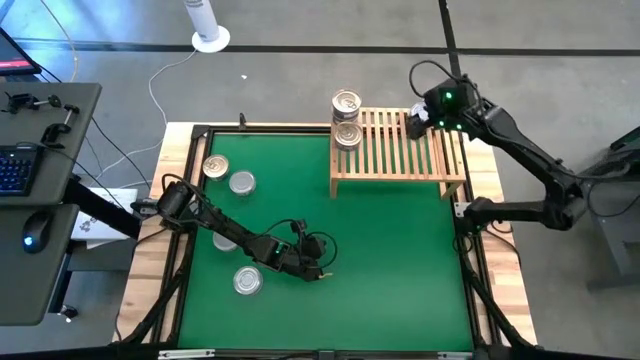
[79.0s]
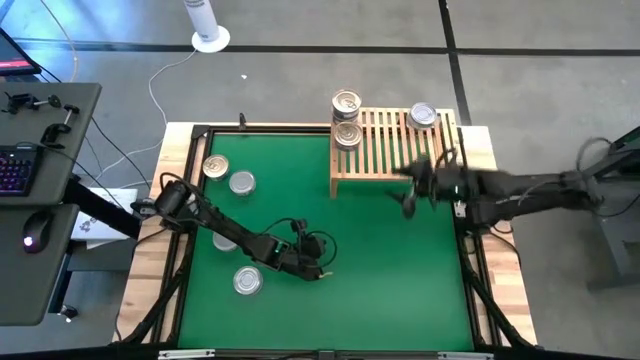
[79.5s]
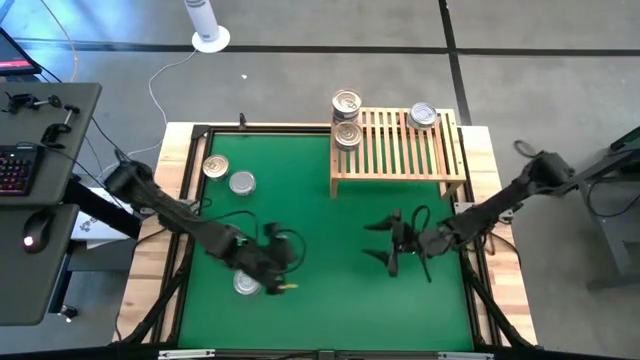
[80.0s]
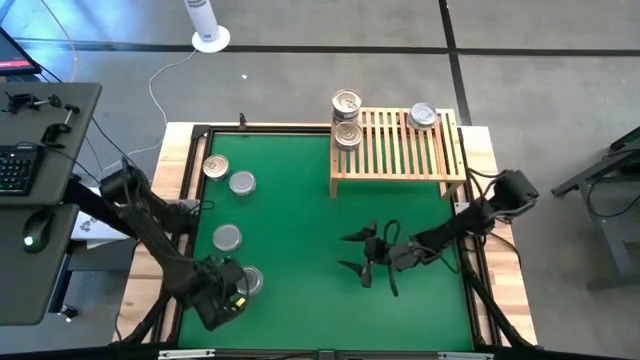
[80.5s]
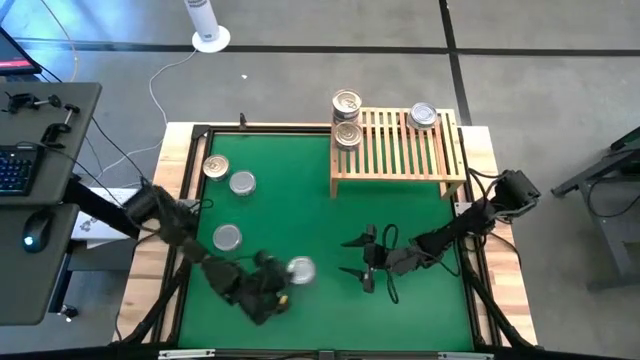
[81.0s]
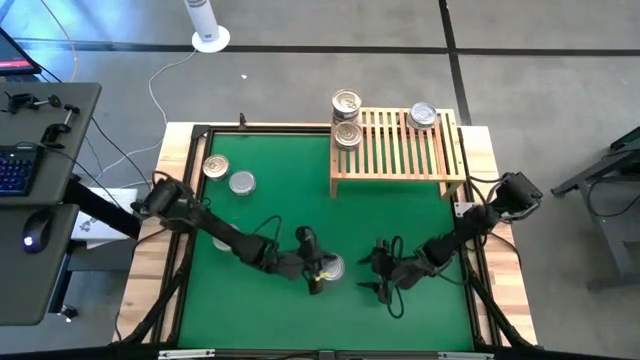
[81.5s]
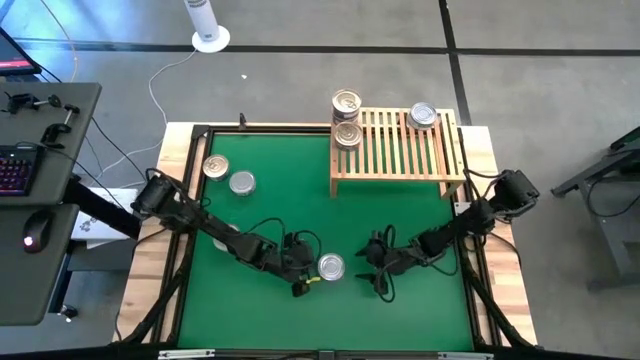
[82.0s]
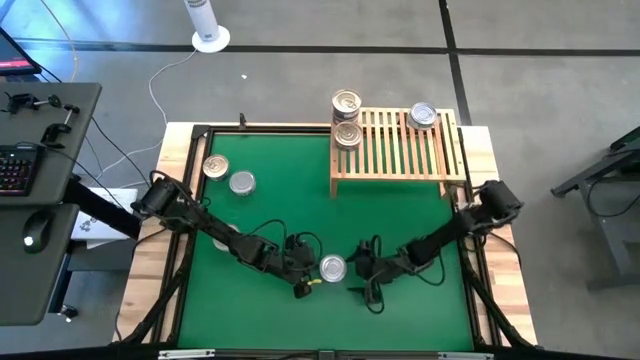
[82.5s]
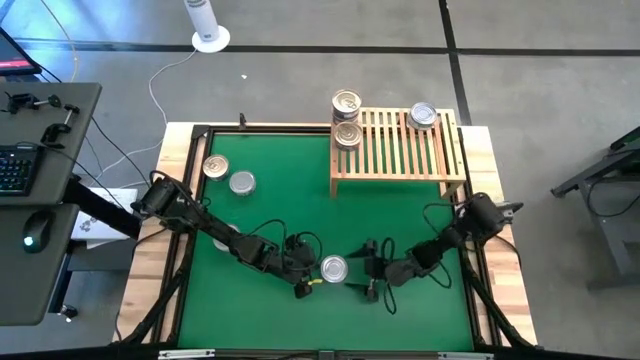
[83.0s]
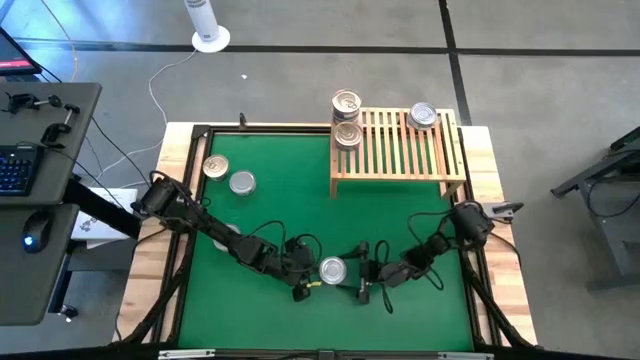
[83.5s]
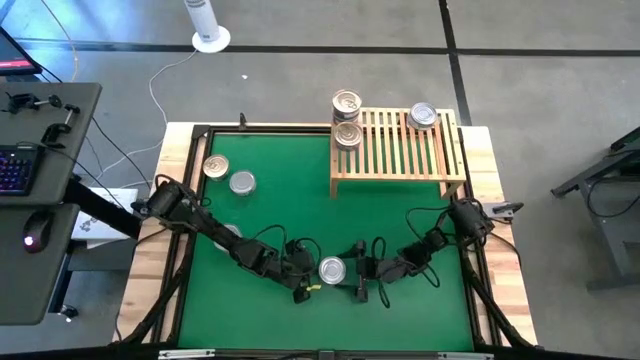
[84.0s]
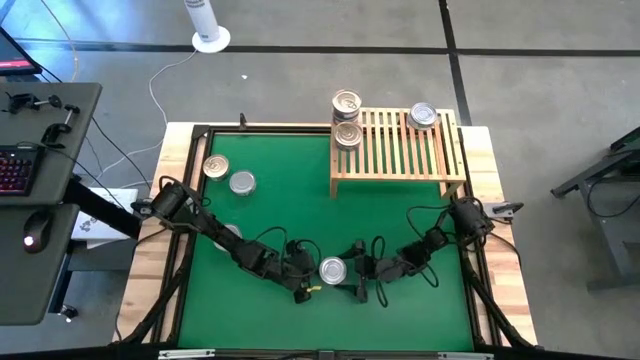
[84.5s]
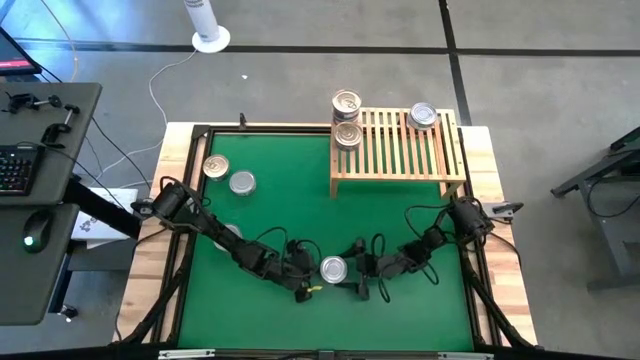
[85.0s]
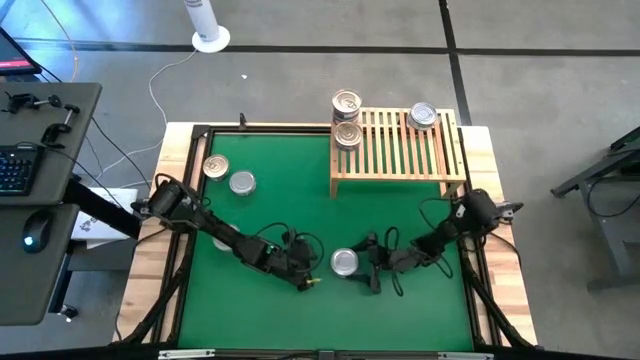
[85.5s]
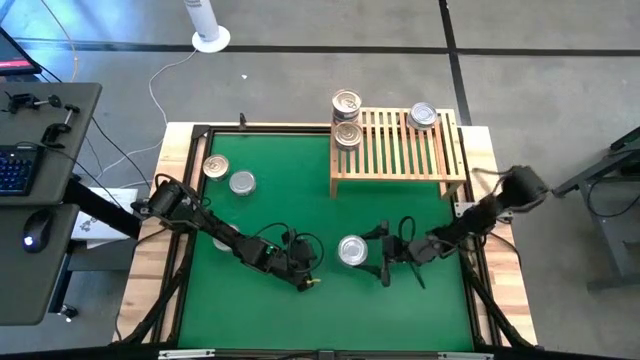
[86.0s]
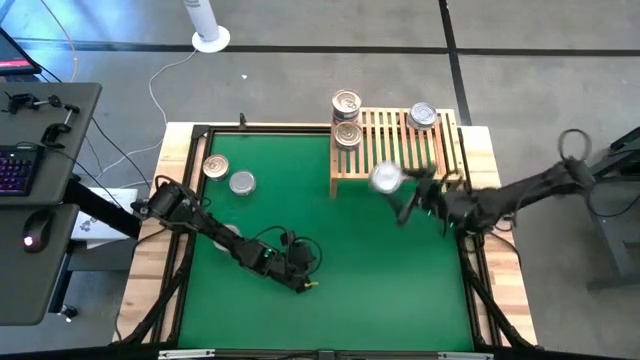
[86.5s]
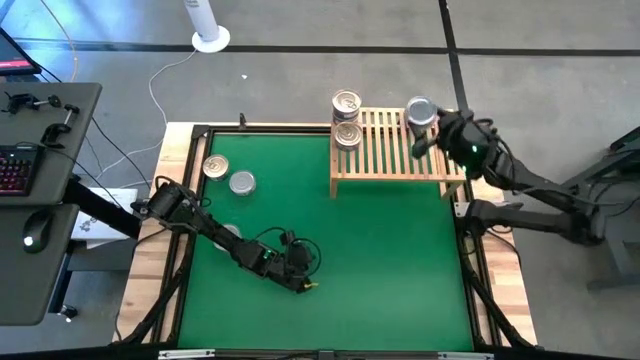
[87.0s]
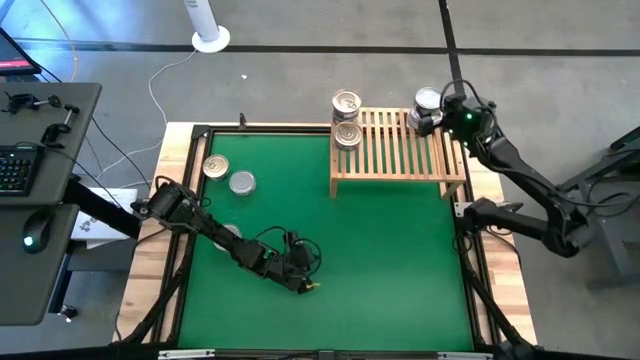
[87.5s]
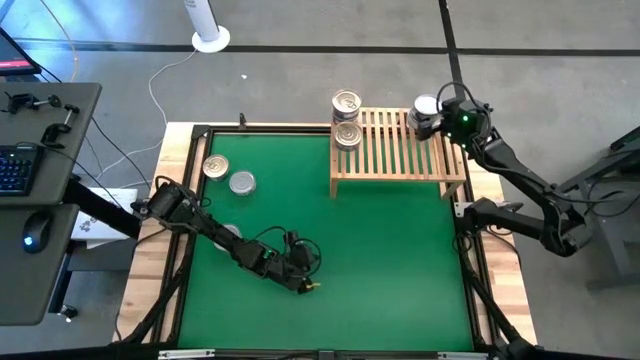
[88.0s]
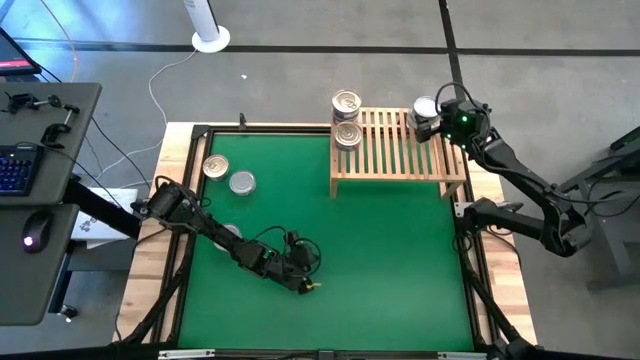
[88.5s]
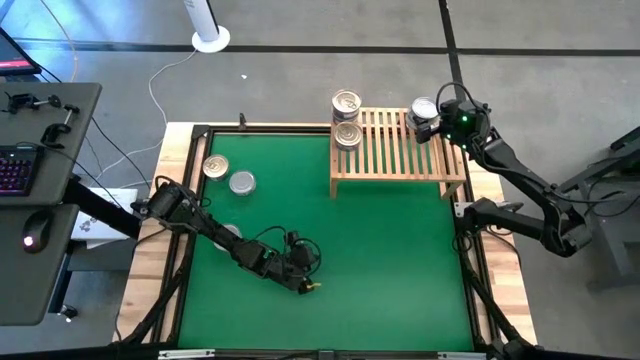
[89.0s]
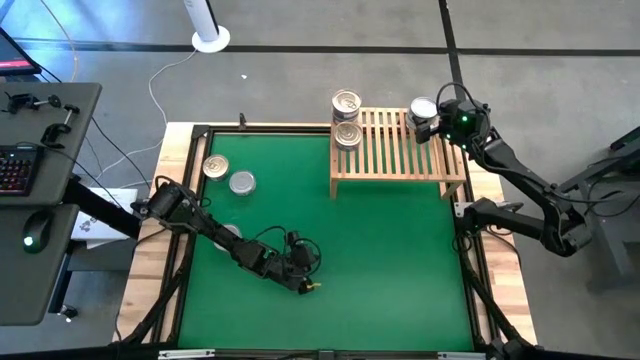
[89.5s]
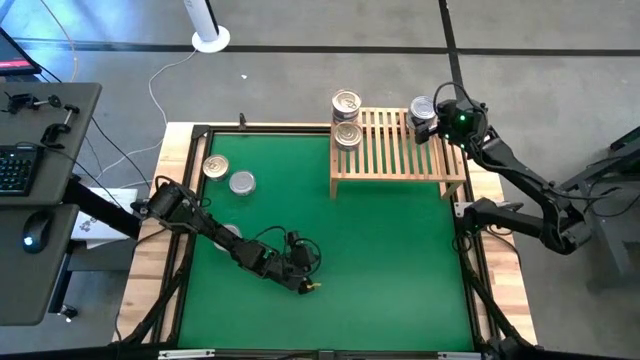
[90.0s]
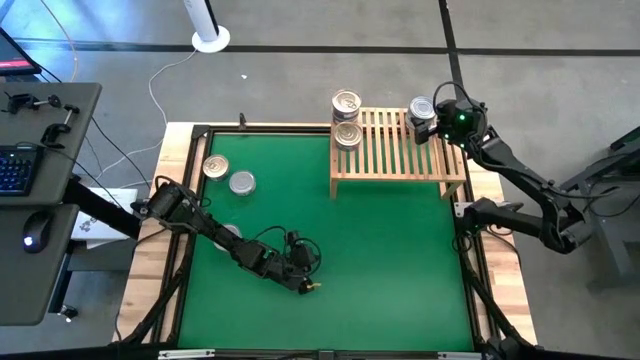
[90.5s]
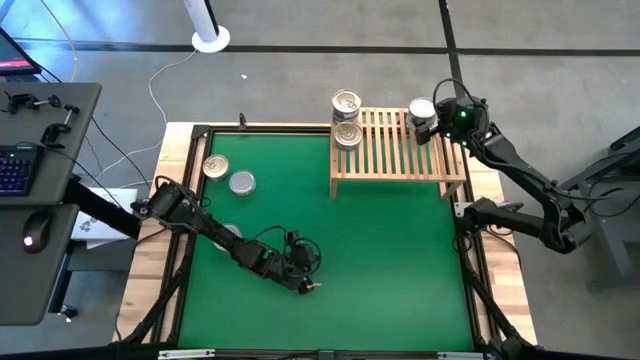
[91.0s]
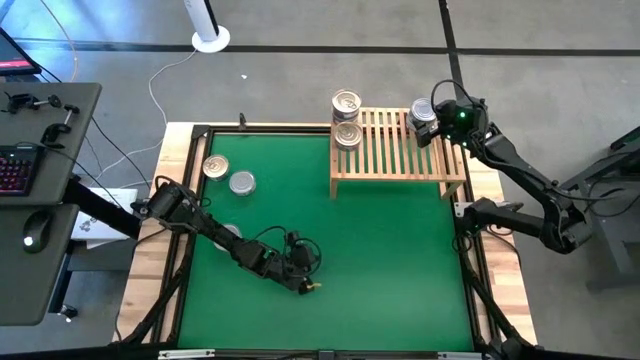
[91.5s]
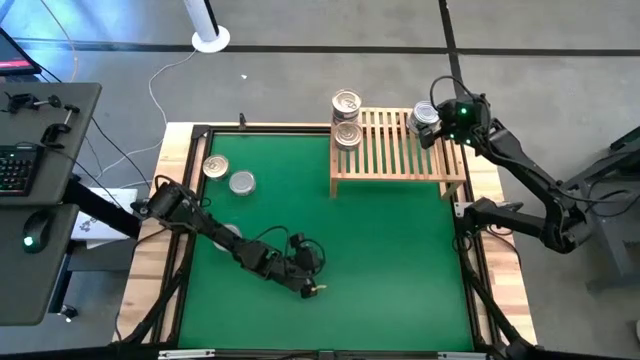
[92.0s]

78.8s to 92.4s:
Task: Stack canned seafood by type on shelf
Stack the green tuna can on top of the green tuna can on the shelf

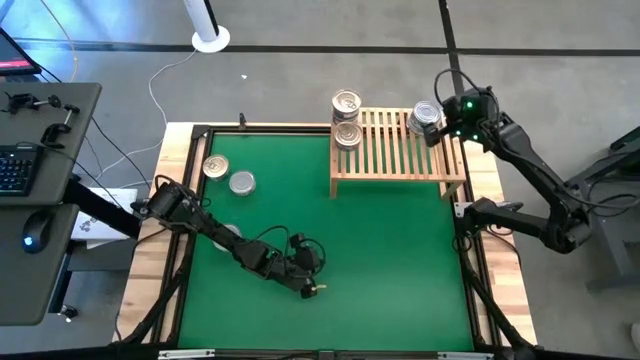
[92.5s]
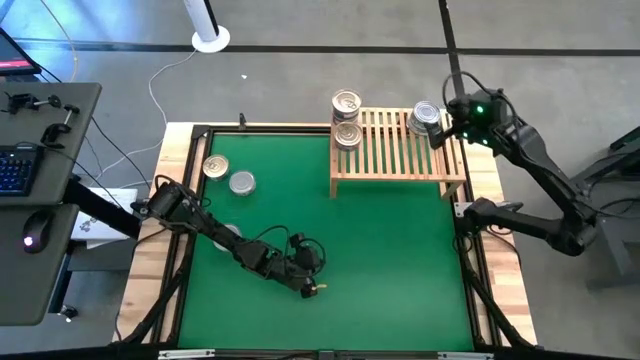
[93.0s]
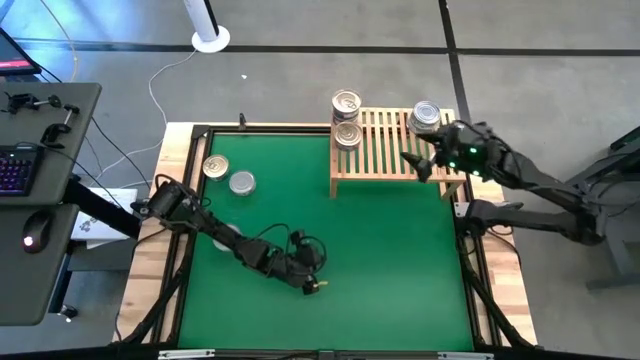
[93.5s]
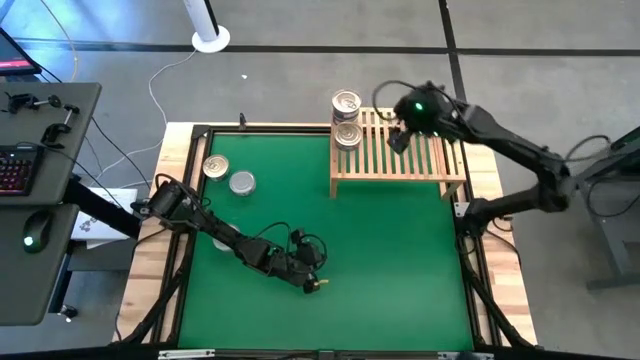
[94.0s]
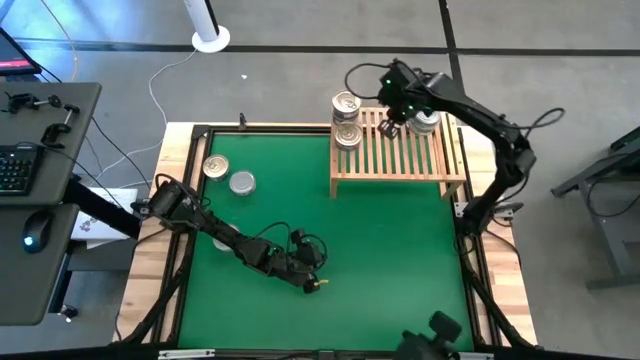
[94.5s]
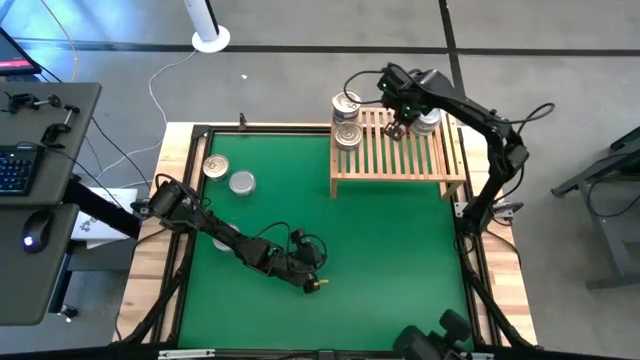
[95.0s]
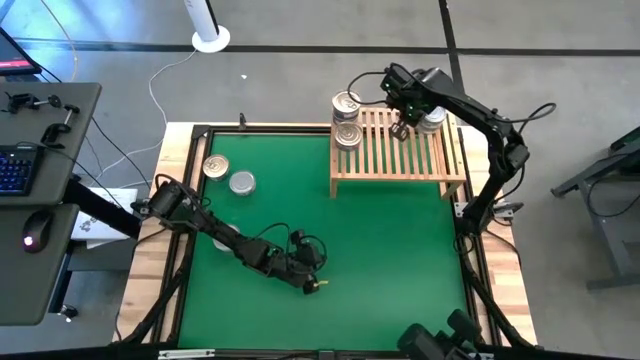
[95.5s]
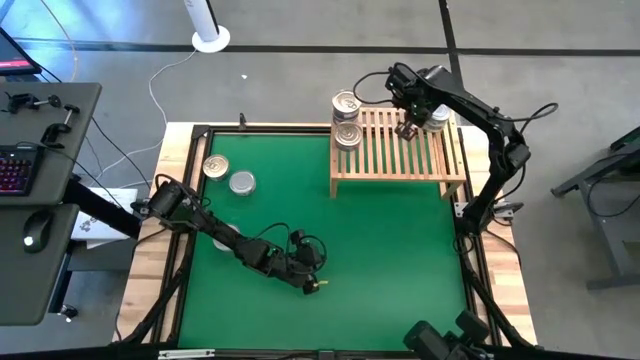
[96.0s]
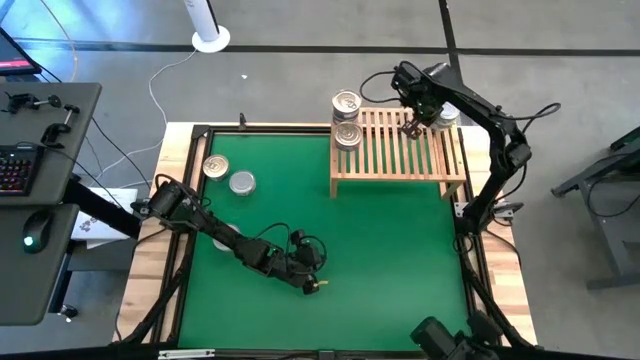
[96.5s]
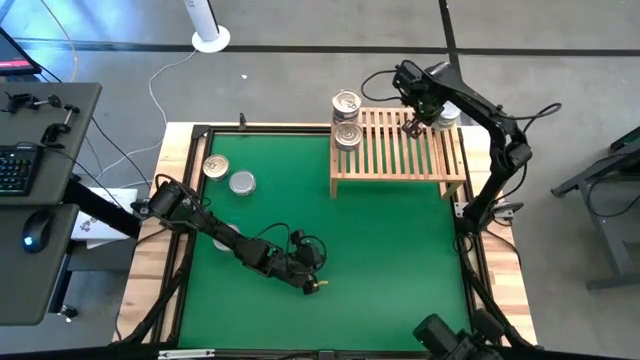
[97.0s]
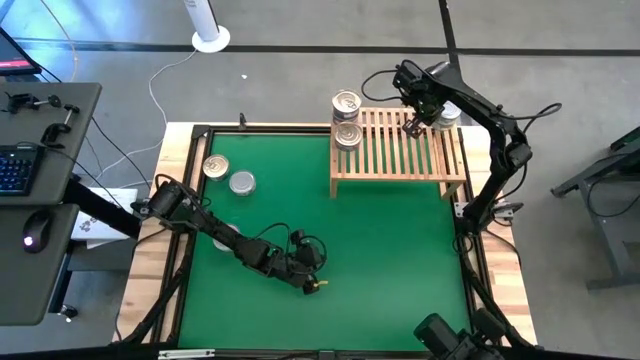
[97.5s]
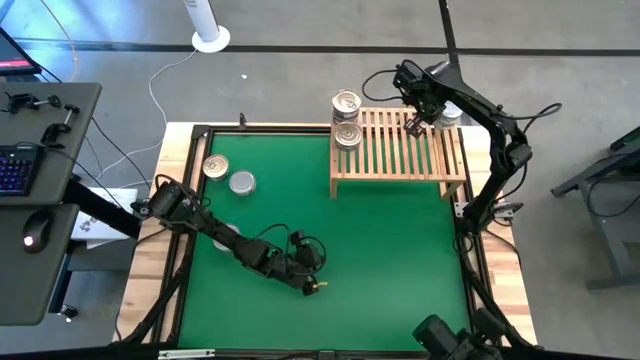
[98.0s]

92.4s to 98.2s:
Adjust the stacked green tuna cans on the shelf

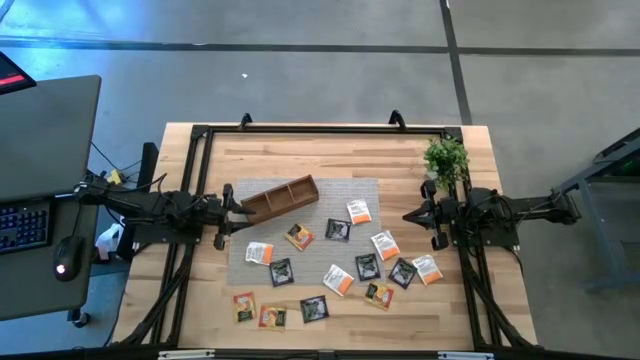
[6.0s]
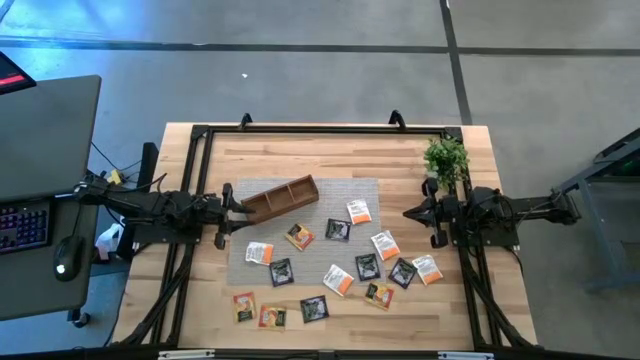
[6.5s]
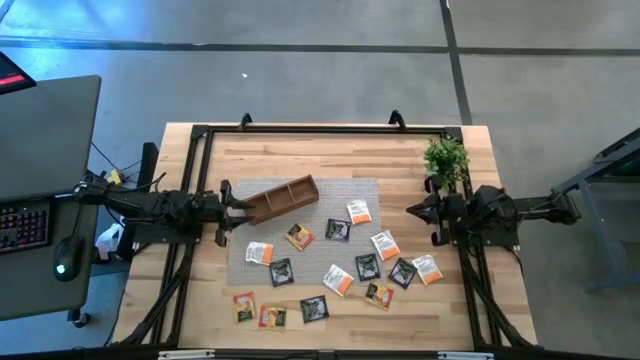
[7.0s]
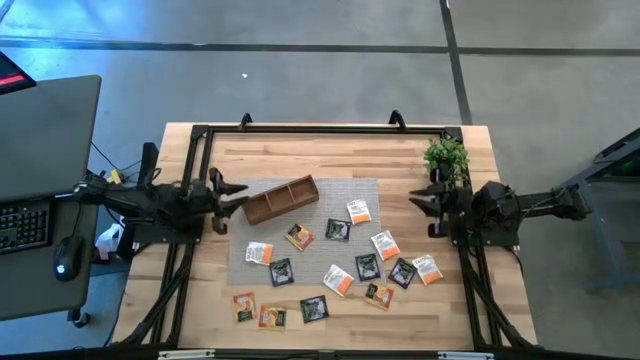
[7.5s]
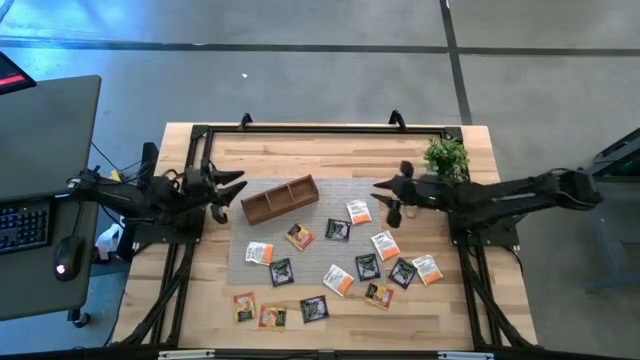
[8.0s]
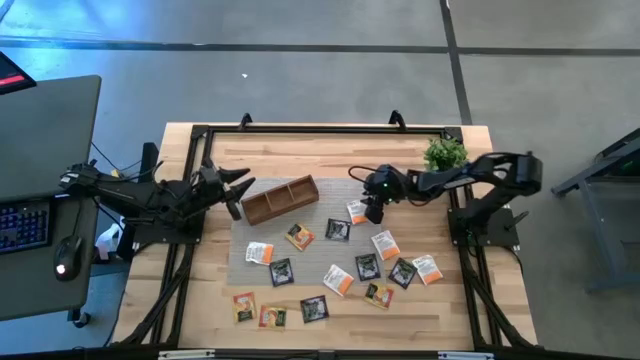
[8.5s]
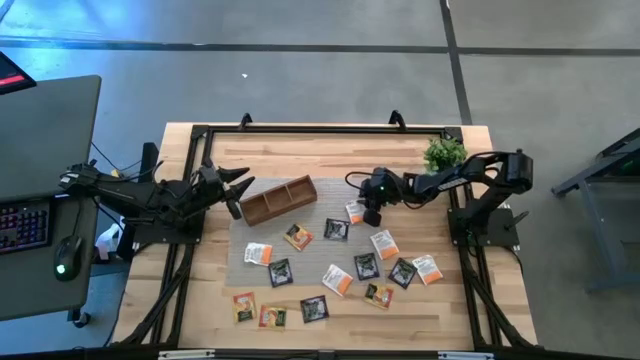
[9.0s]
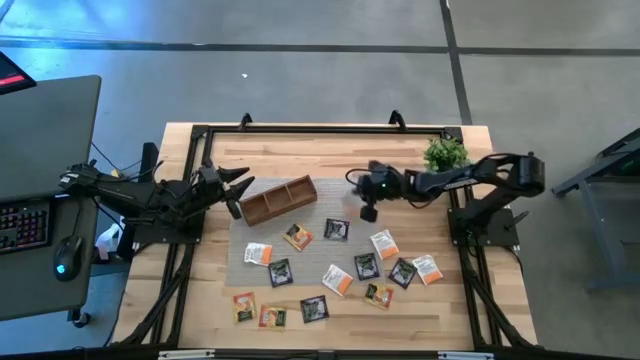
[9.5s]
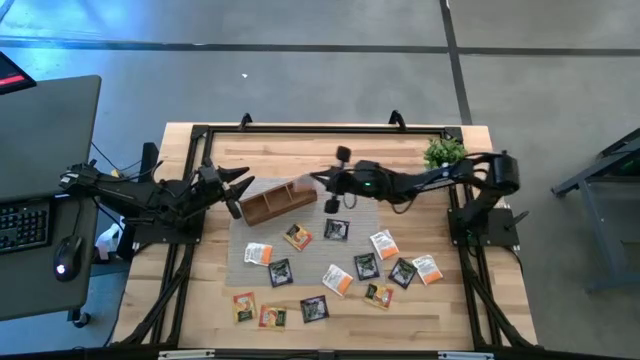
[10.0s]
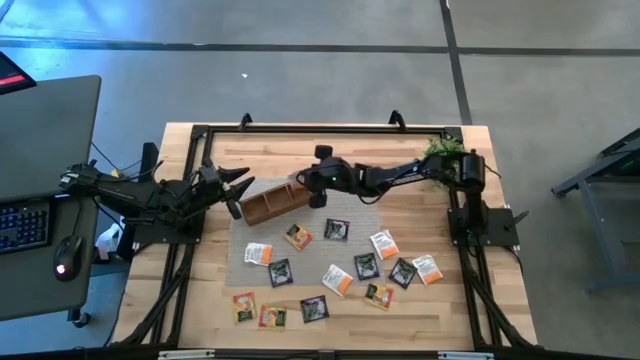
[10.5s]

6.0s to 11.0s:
Task: Pick & Place Tea
Put the orange tea bag into the right section of the wooden organizer
